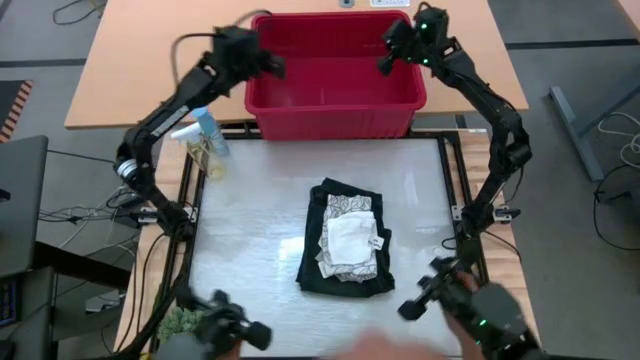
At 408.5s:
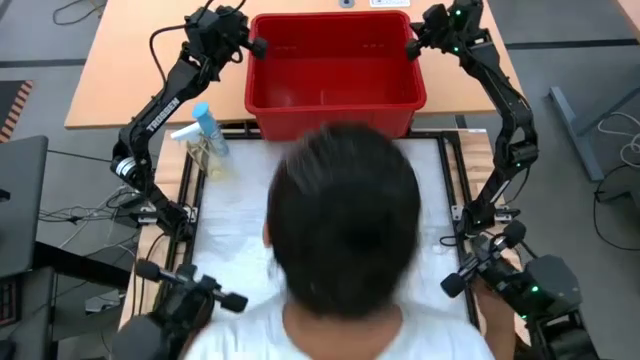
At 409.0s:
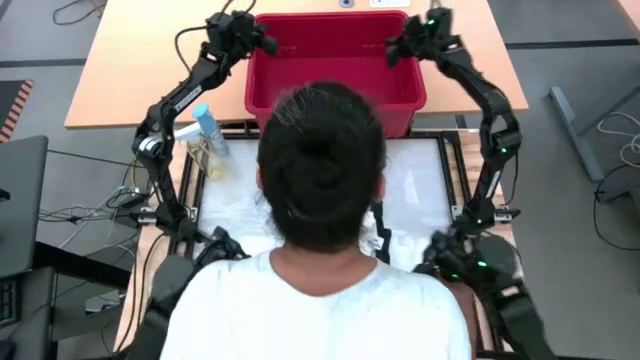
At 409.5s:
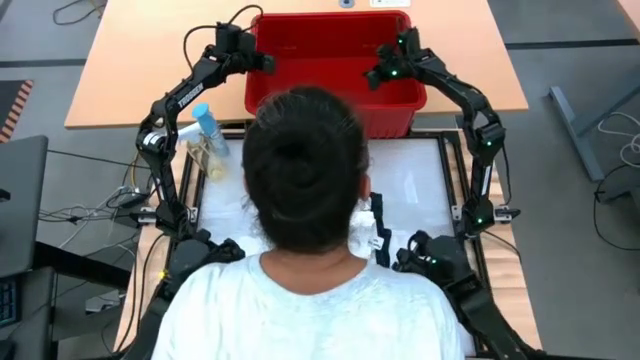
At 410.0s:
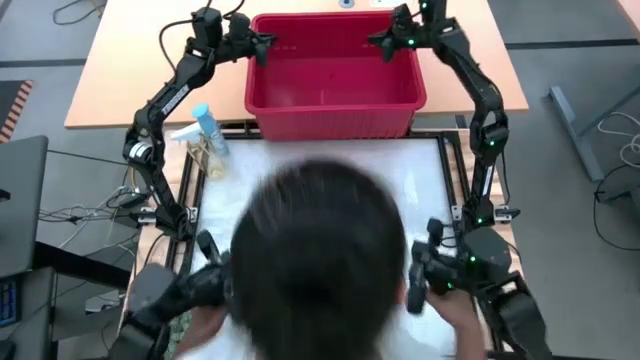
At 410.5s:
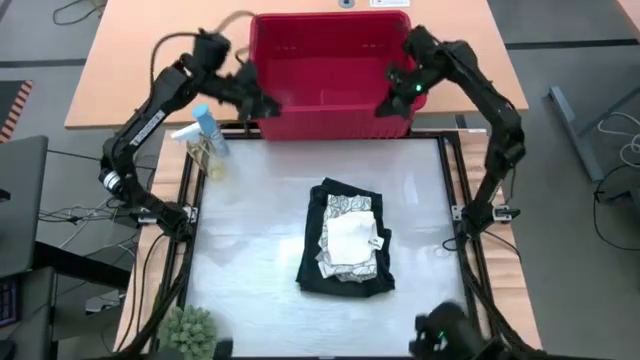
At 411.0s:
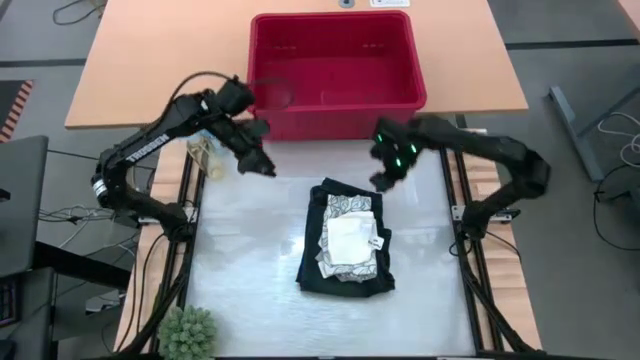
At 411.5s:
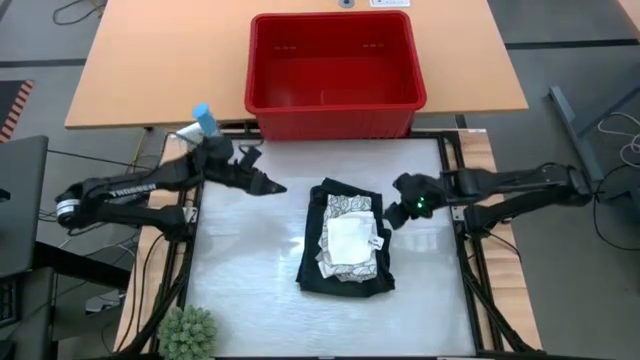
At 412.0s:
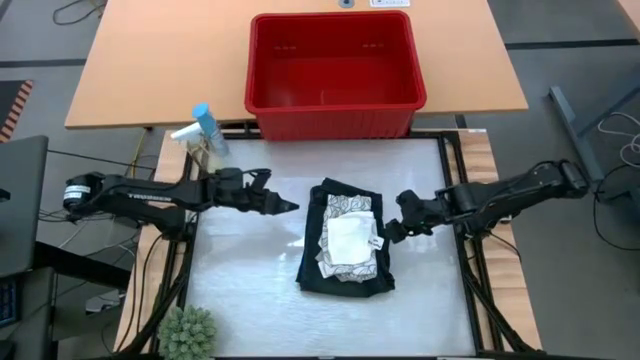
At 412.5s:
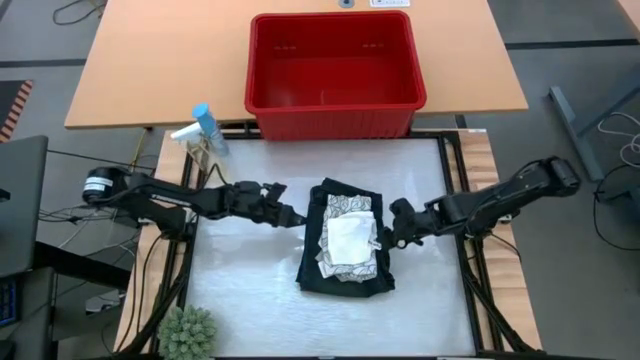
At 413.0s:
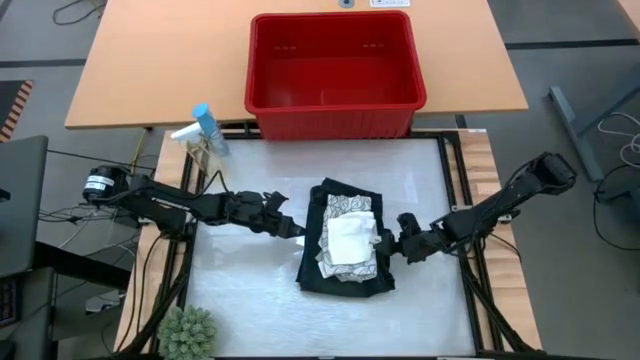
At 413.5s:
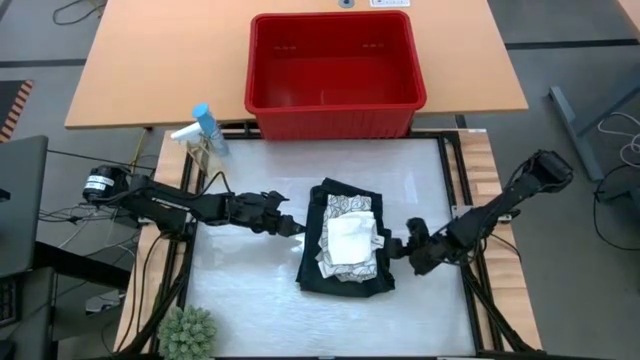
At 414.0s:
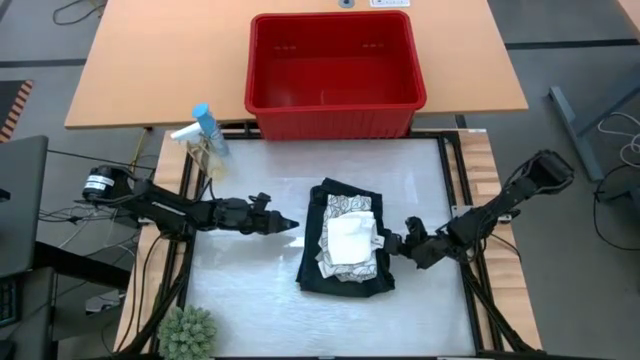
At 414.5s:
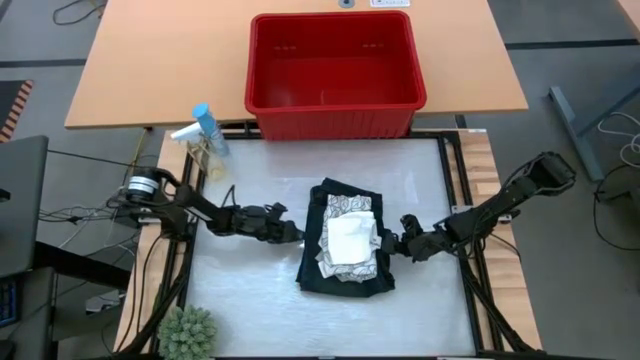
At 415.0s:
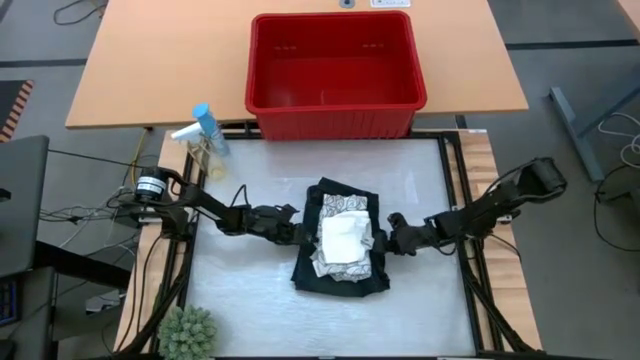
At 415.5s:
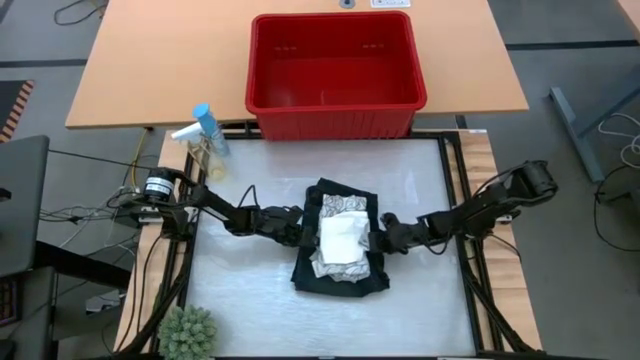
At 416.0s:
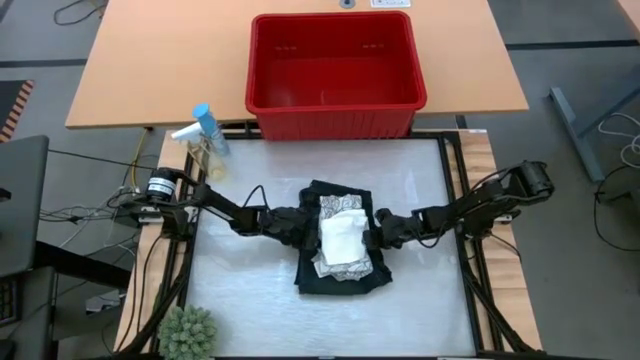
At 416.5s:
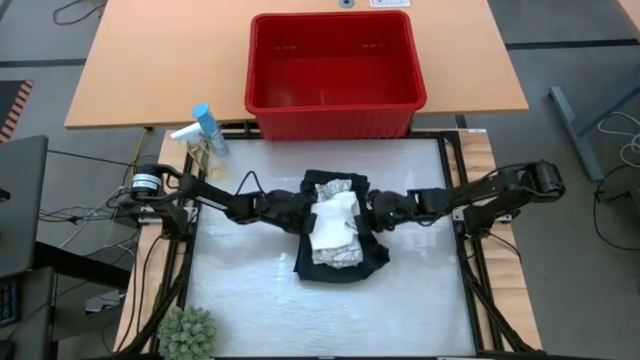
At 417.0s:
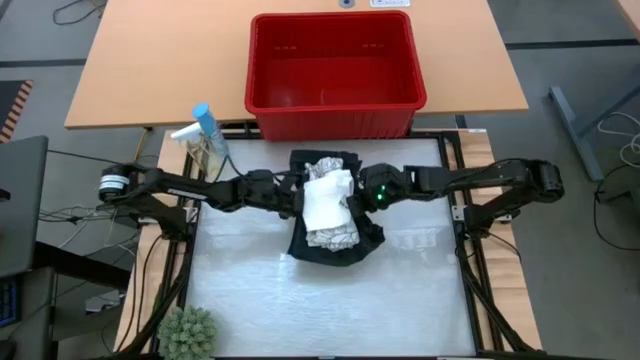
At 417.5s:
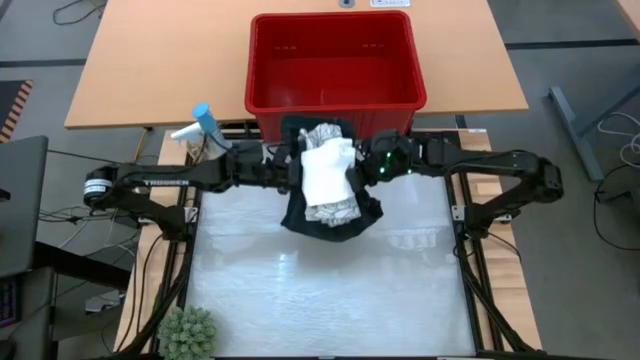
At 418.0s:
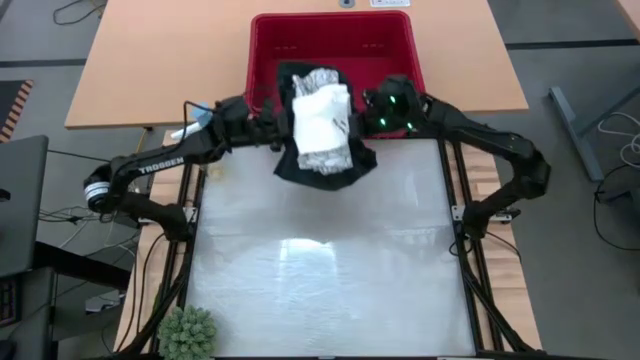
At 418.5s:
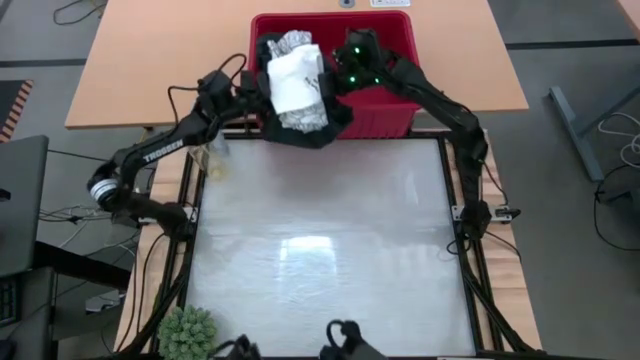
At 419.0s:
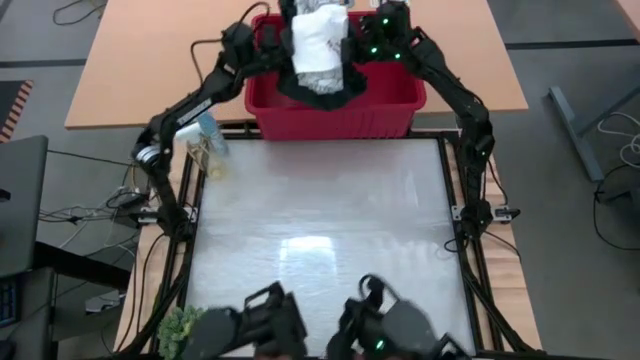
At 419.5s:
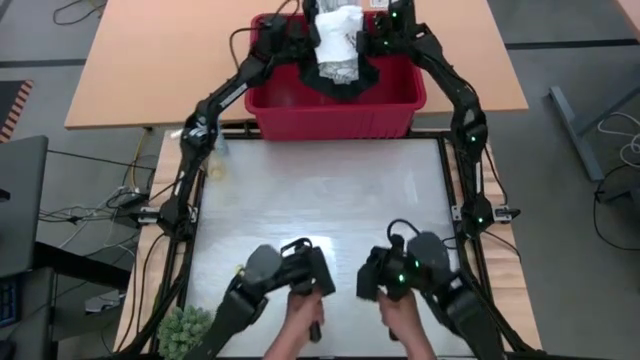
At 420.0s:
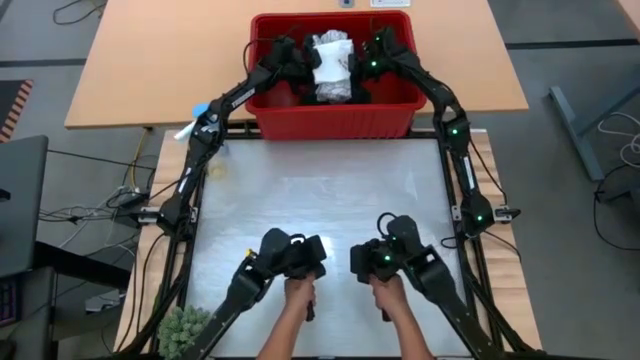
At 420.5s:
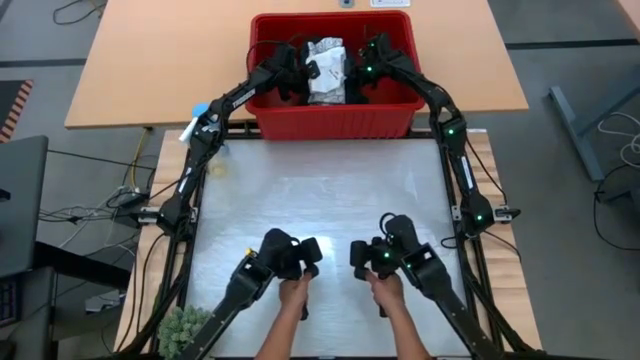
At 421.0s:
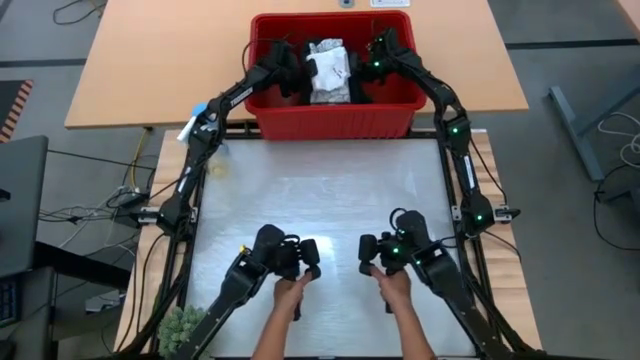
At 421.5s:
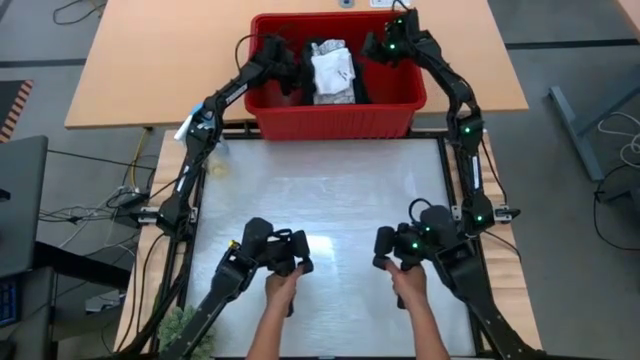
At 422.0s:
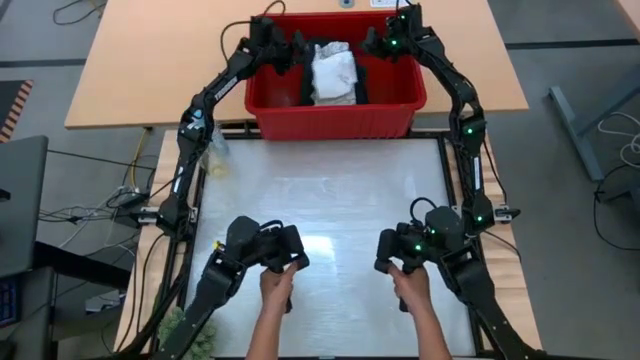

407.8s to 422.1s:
Task: Fold Laundry from Bin
Put the stacked folded clothes into the red laundry bin

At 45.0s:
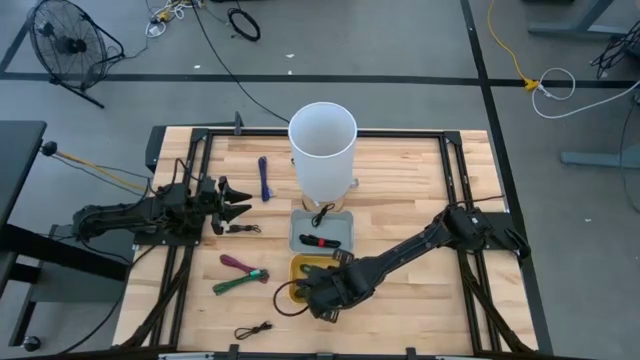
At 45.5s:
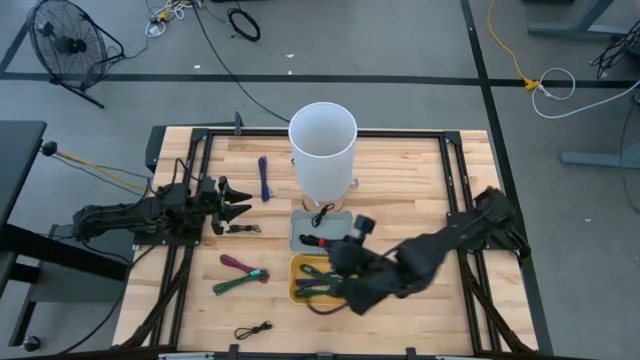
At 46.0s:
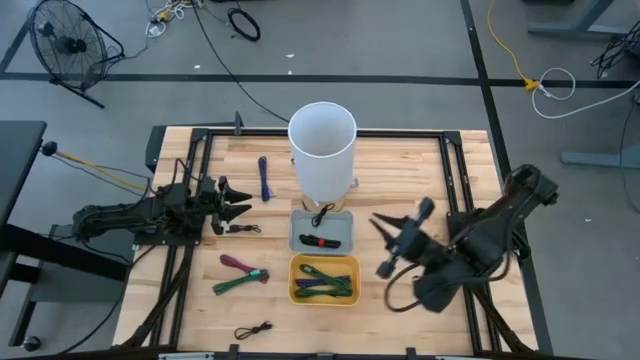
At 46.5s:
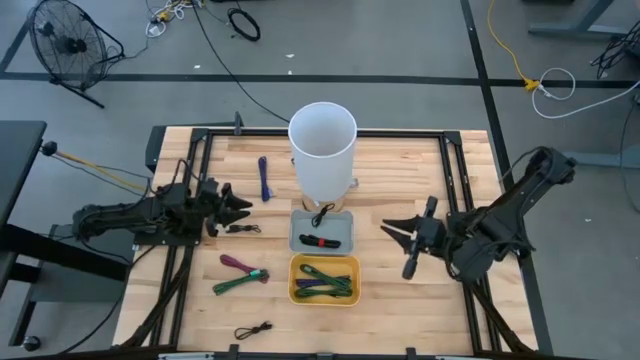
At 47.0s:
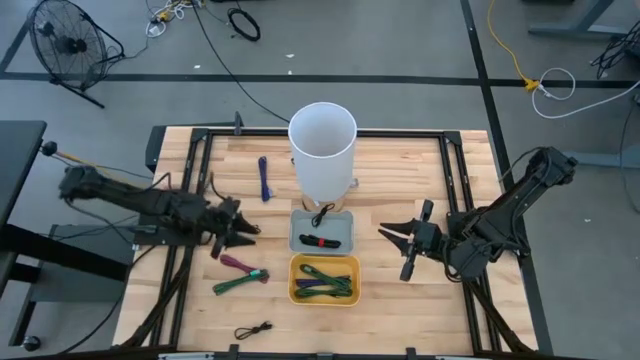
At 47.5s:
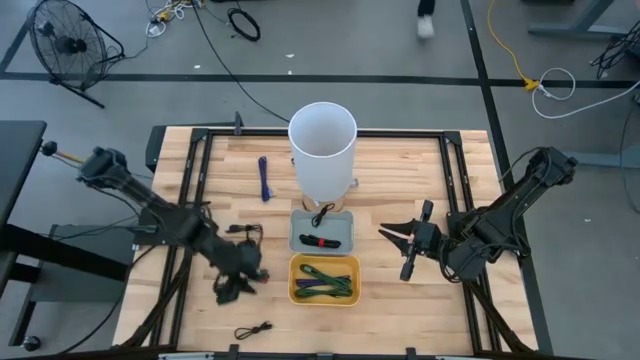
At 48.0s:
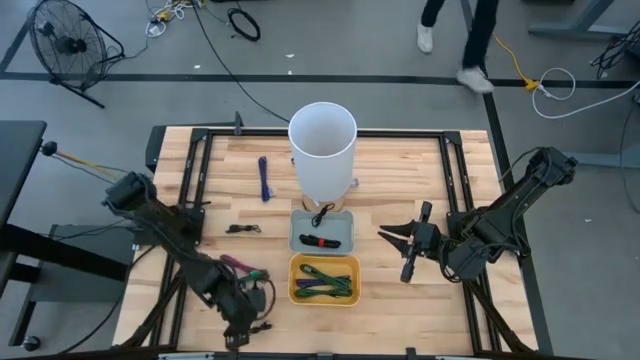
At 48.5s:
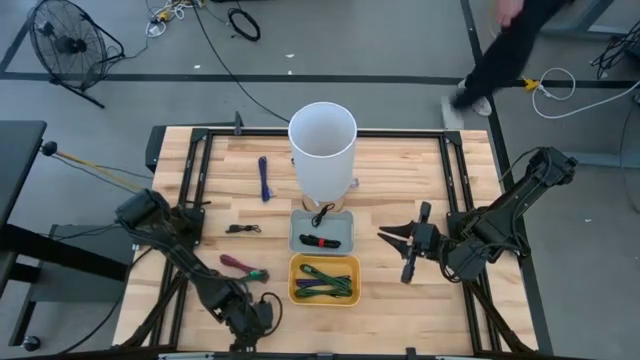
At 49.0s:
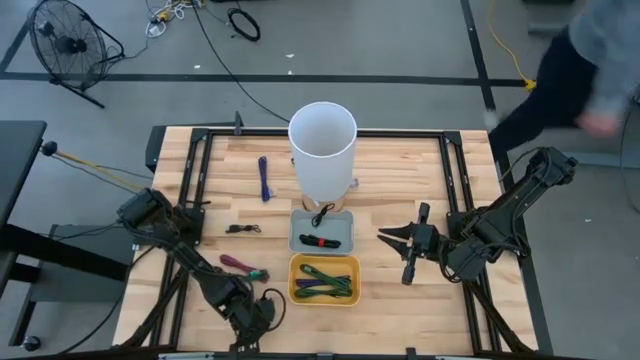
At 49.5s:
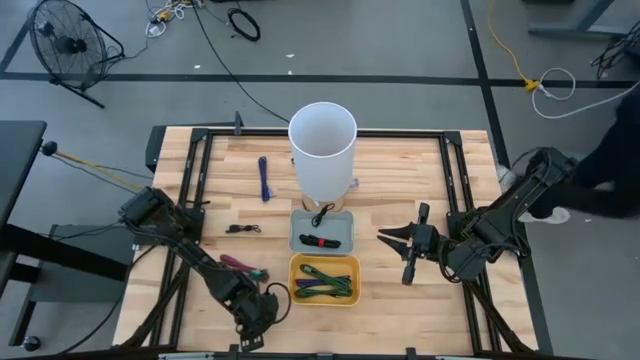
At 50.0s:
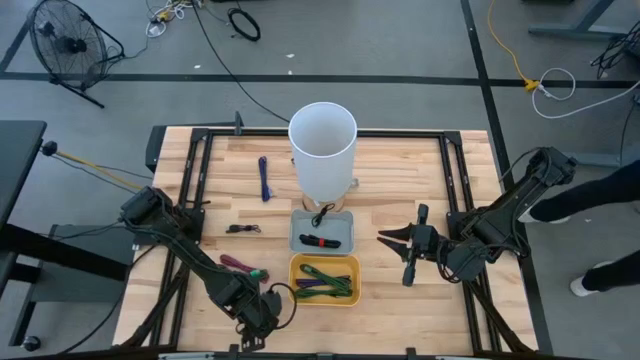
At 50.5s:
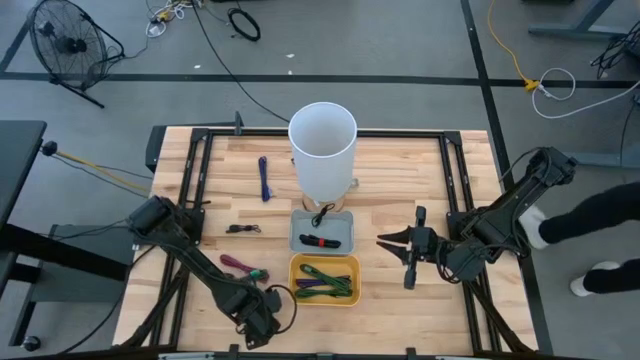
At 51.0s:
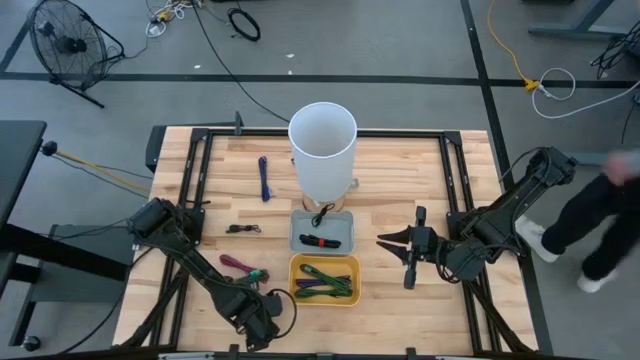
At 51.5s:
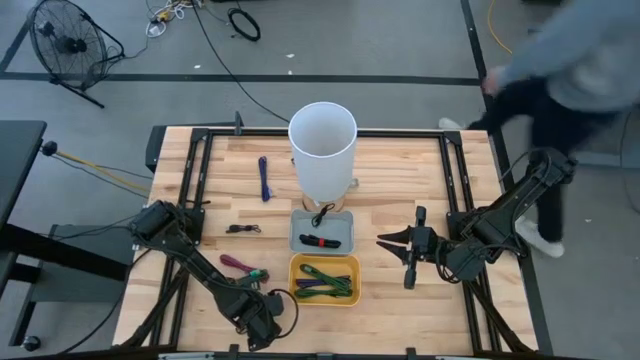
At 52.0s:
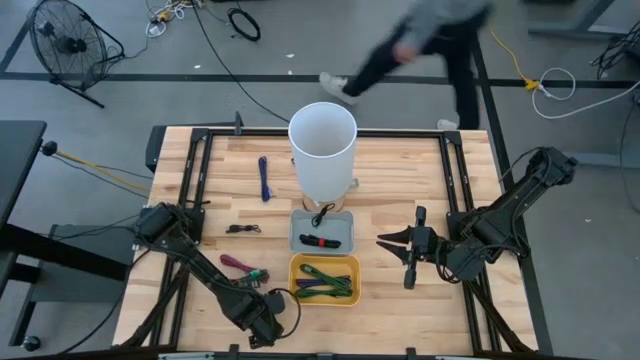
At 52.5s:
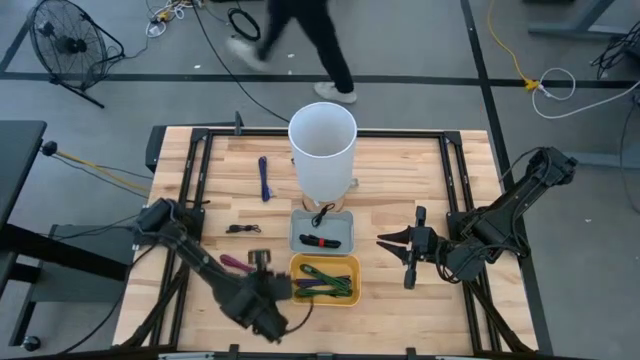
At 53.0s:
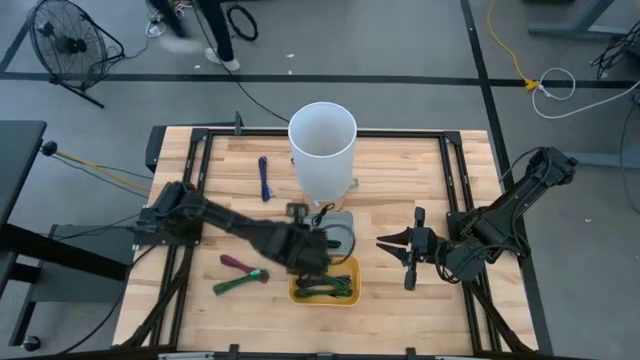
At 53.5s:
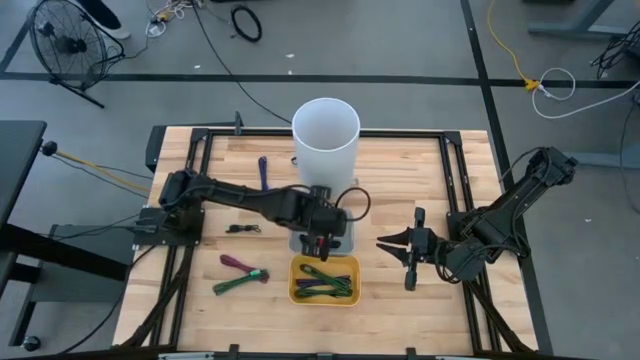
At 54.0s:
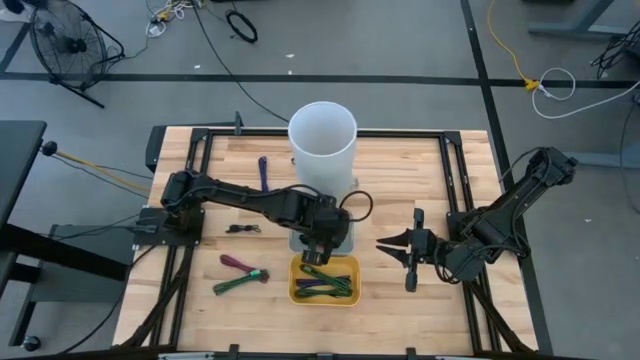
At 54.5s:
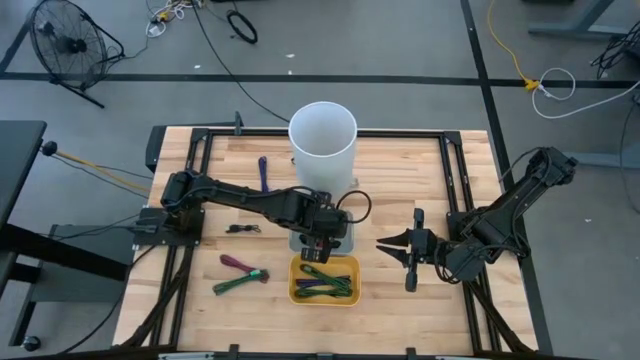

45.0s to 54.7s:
Task: Pick & Place USB Port
Put the black charger cable into the gray bin
